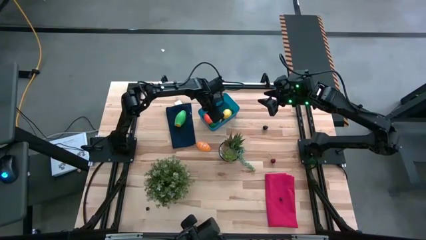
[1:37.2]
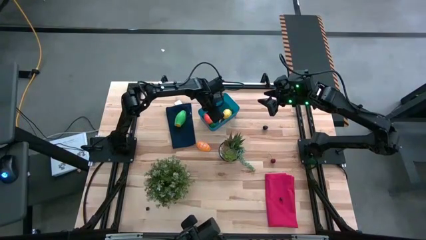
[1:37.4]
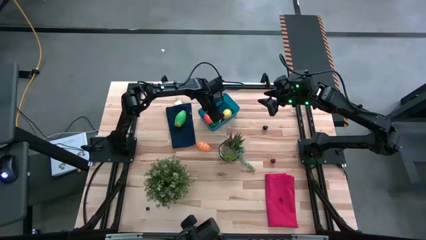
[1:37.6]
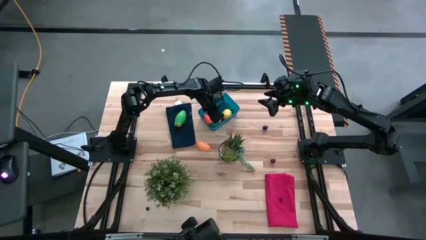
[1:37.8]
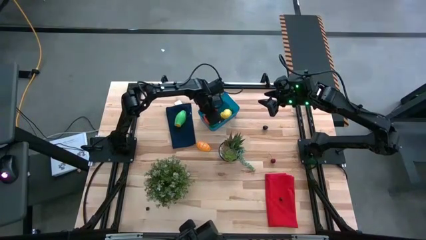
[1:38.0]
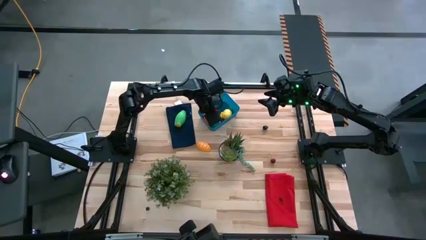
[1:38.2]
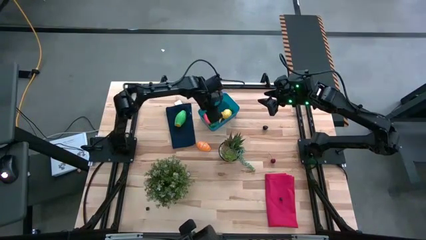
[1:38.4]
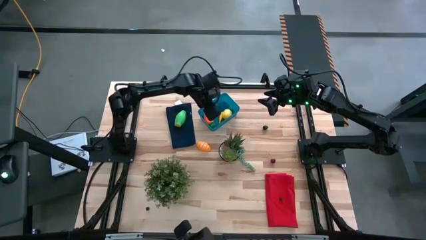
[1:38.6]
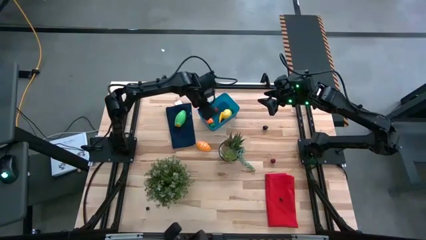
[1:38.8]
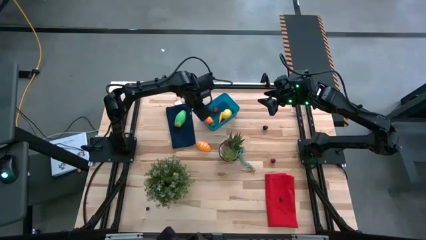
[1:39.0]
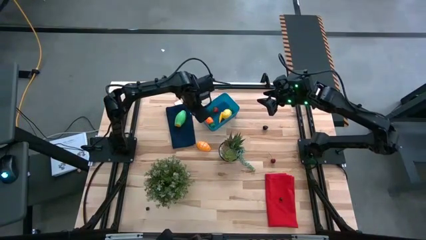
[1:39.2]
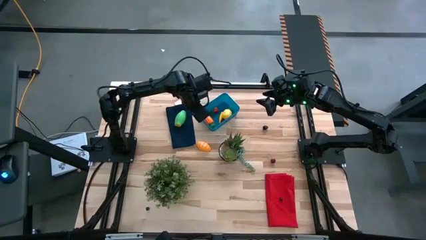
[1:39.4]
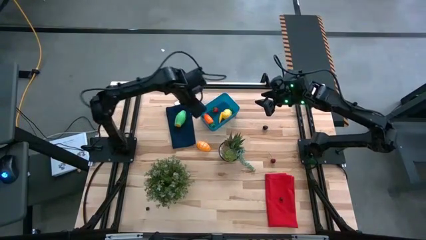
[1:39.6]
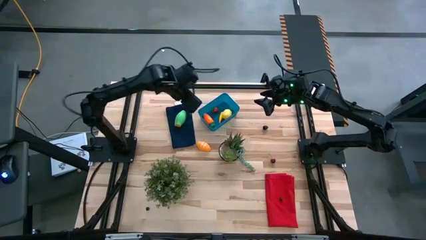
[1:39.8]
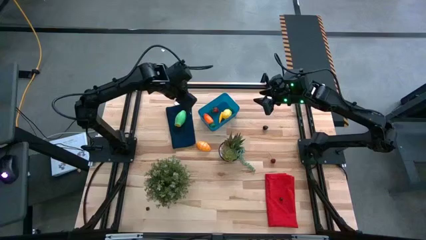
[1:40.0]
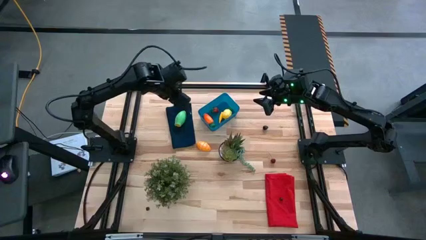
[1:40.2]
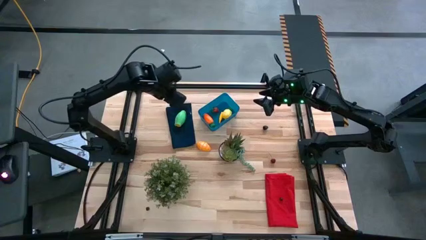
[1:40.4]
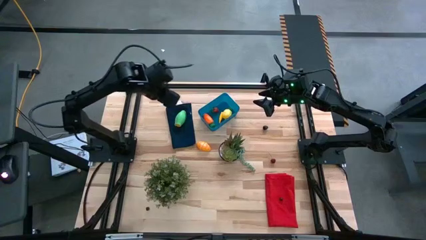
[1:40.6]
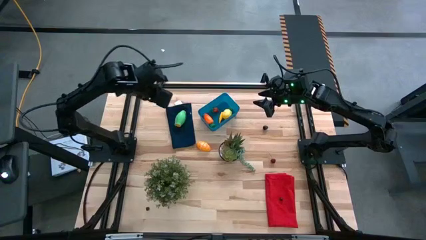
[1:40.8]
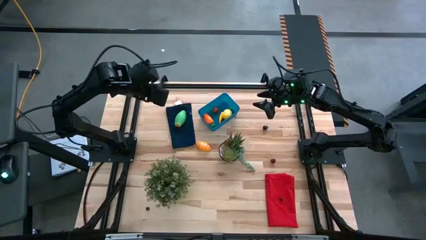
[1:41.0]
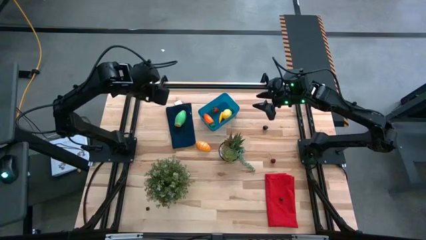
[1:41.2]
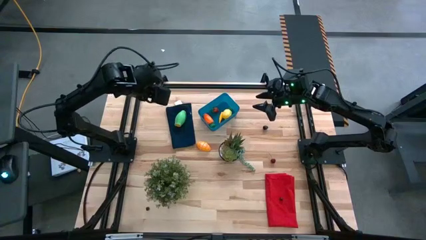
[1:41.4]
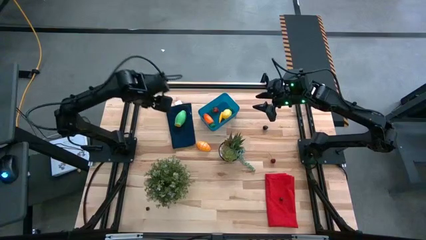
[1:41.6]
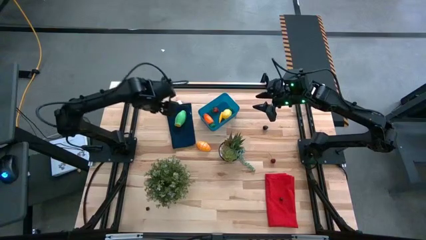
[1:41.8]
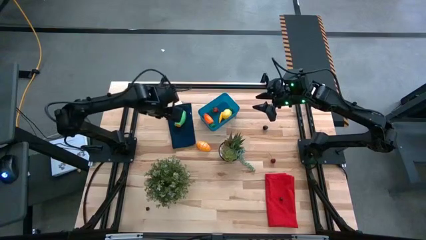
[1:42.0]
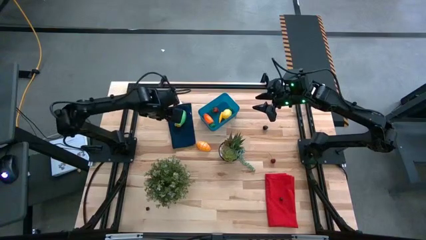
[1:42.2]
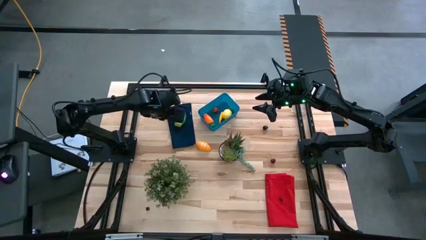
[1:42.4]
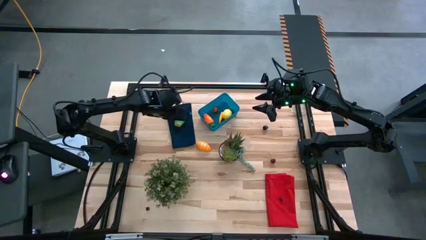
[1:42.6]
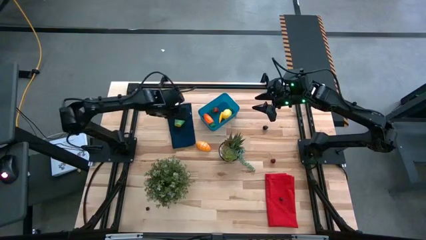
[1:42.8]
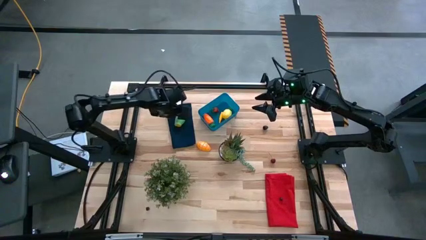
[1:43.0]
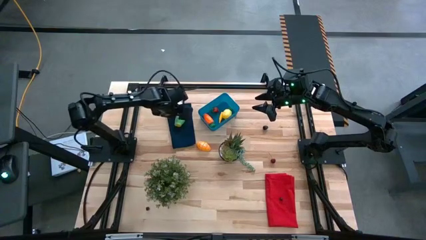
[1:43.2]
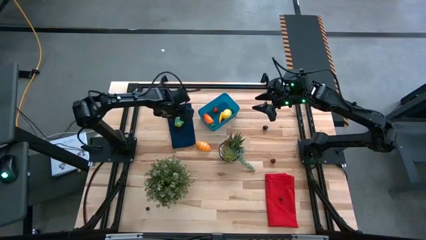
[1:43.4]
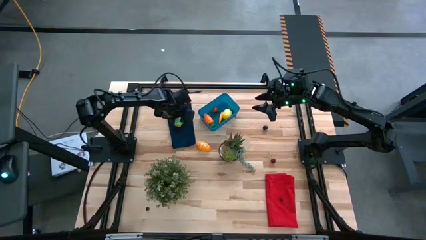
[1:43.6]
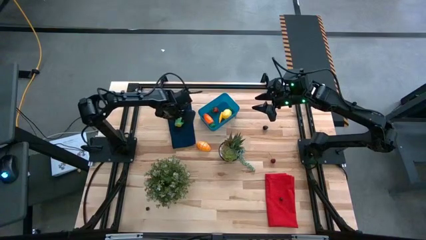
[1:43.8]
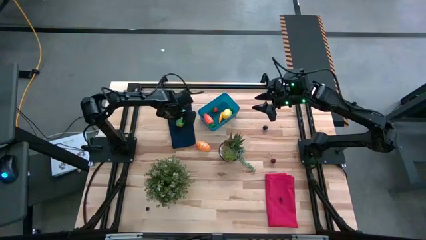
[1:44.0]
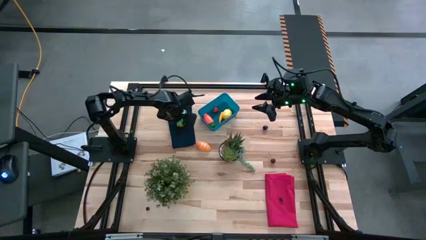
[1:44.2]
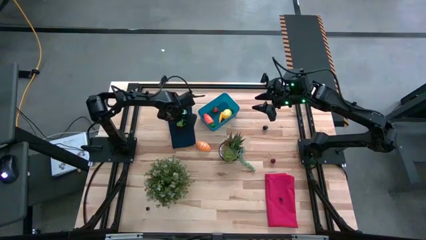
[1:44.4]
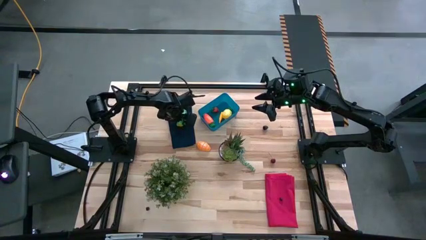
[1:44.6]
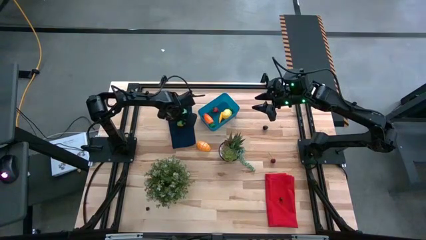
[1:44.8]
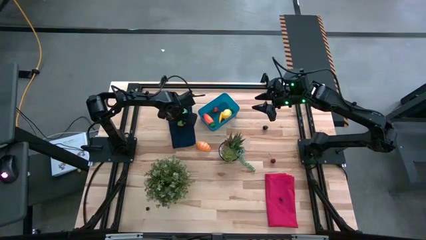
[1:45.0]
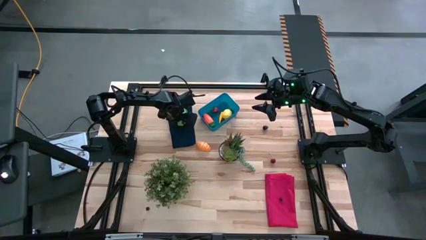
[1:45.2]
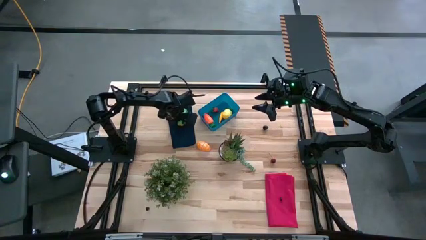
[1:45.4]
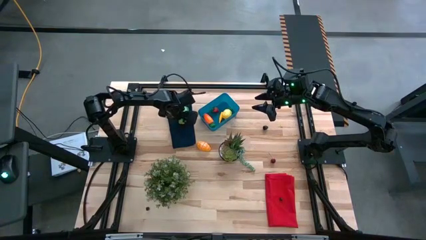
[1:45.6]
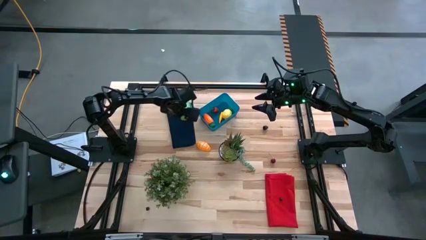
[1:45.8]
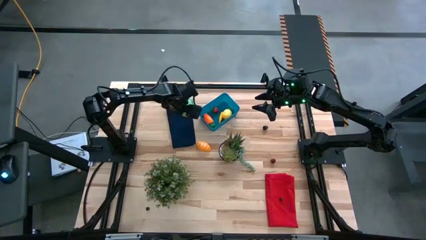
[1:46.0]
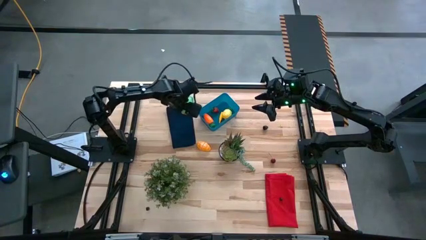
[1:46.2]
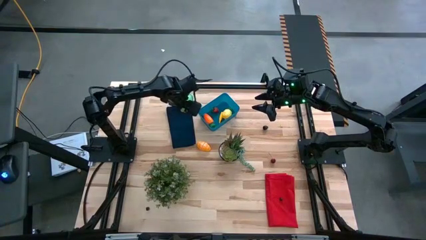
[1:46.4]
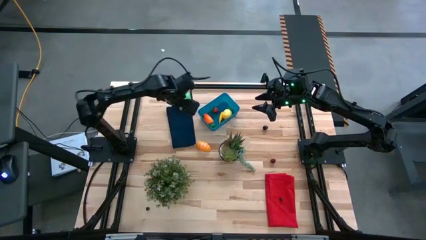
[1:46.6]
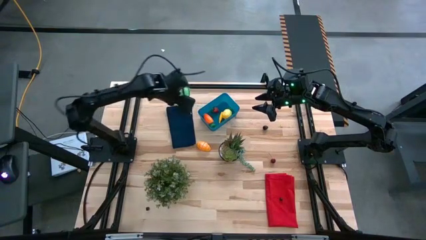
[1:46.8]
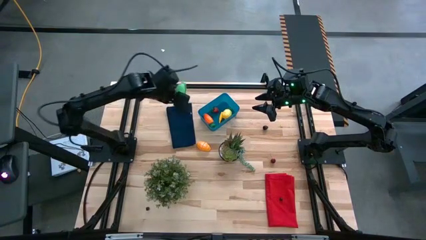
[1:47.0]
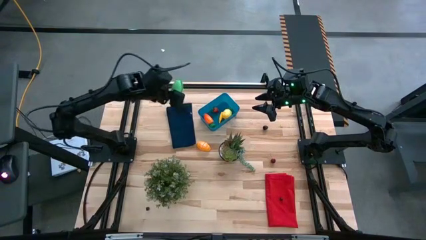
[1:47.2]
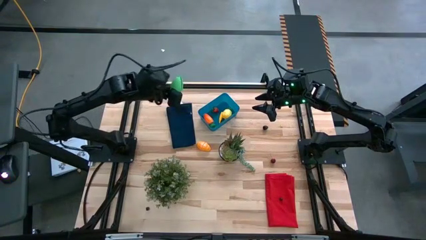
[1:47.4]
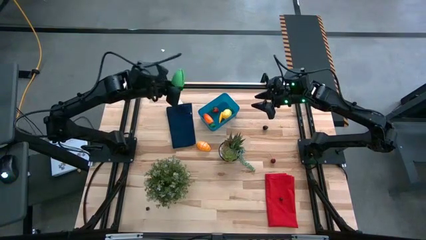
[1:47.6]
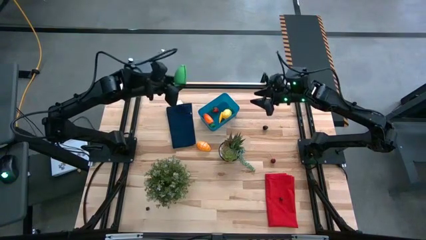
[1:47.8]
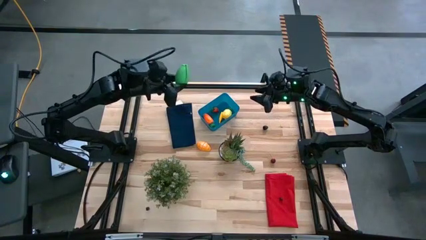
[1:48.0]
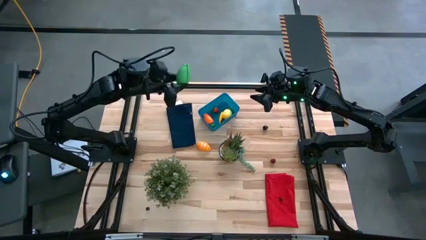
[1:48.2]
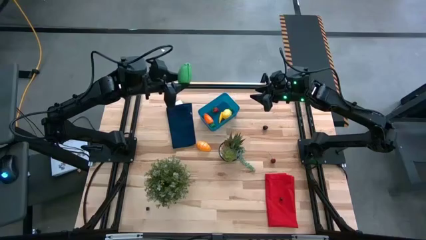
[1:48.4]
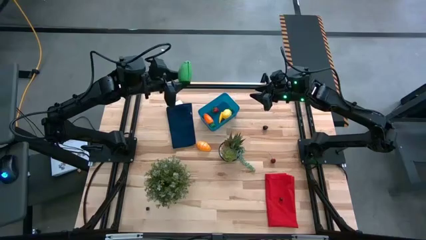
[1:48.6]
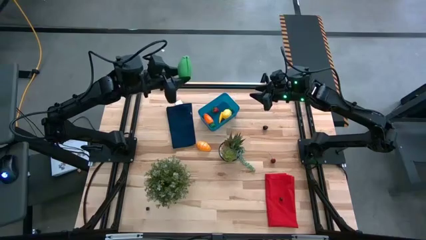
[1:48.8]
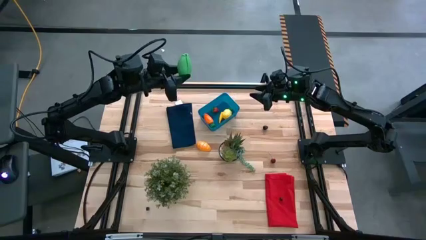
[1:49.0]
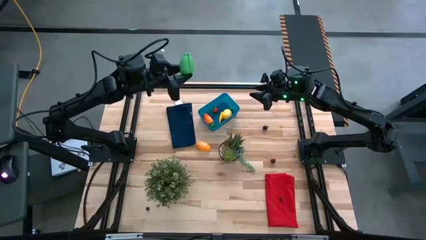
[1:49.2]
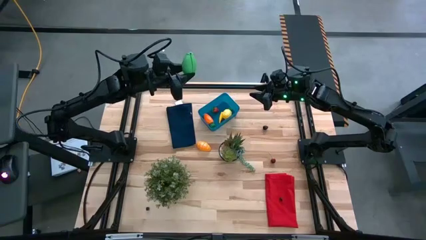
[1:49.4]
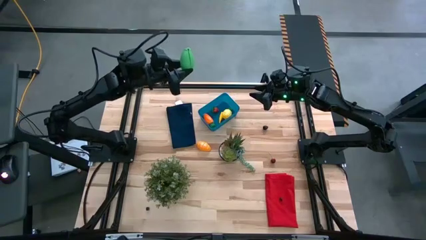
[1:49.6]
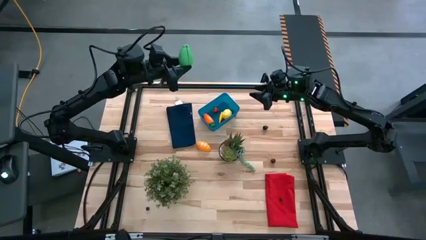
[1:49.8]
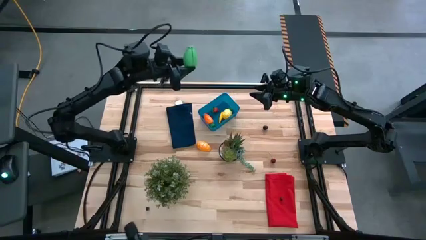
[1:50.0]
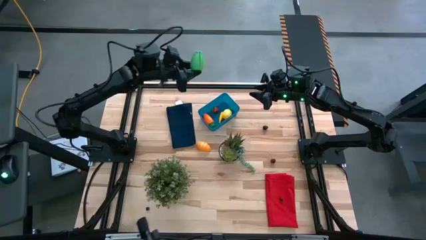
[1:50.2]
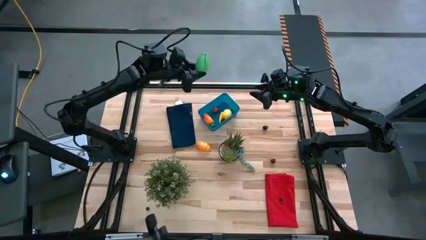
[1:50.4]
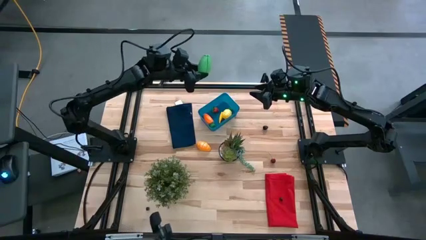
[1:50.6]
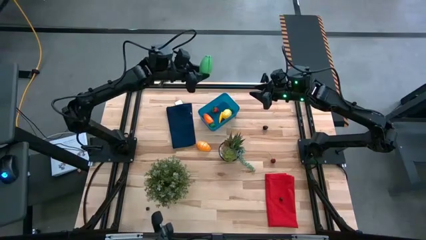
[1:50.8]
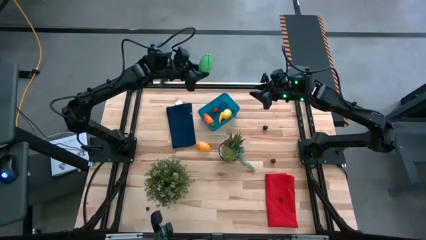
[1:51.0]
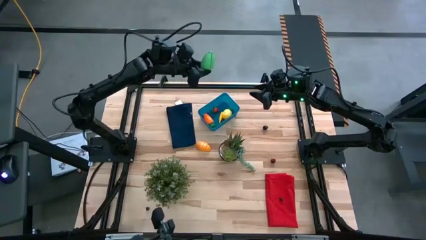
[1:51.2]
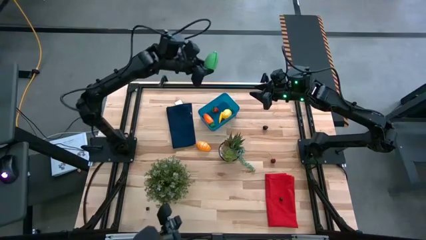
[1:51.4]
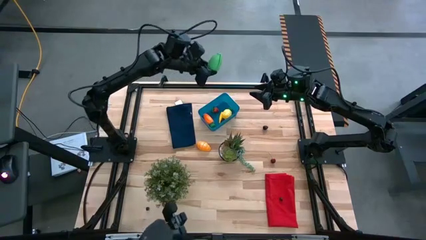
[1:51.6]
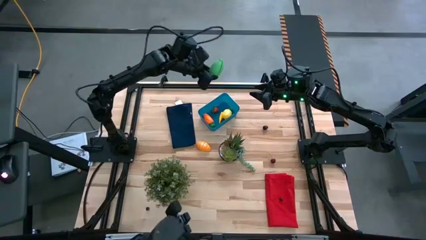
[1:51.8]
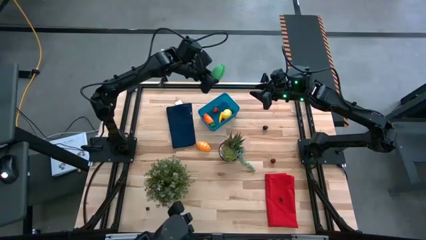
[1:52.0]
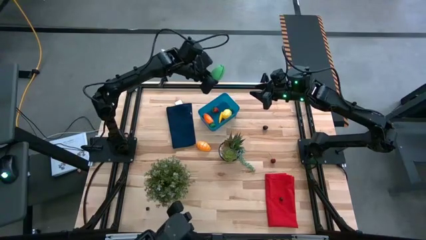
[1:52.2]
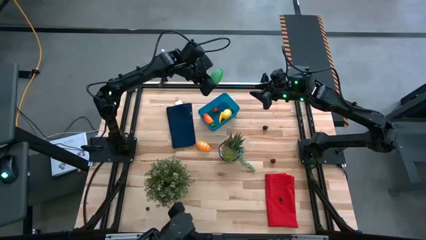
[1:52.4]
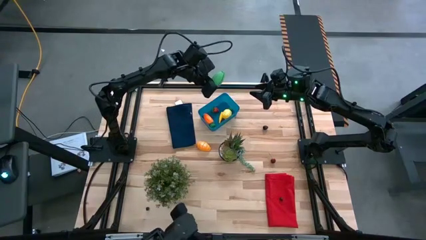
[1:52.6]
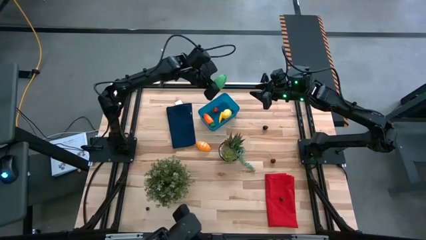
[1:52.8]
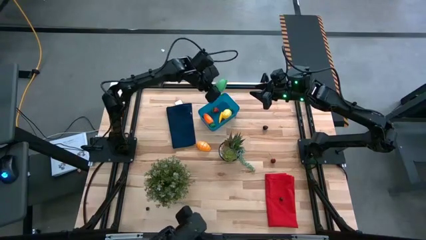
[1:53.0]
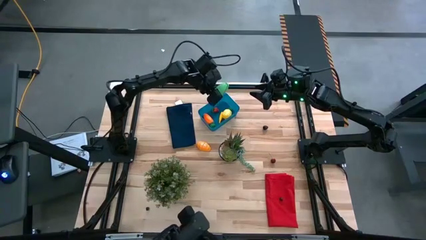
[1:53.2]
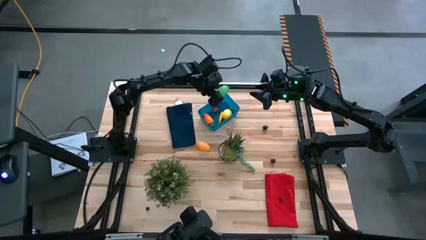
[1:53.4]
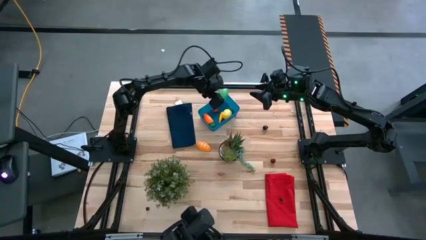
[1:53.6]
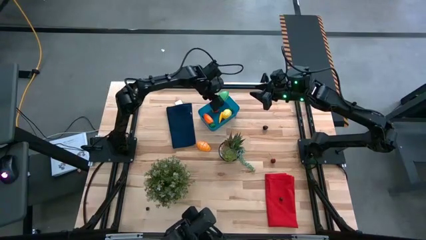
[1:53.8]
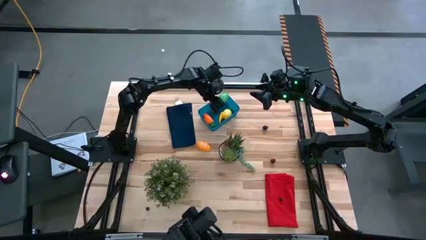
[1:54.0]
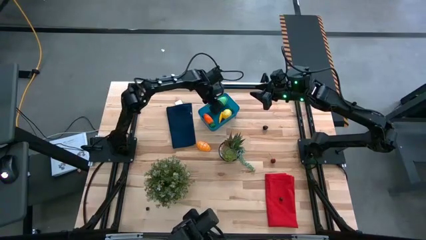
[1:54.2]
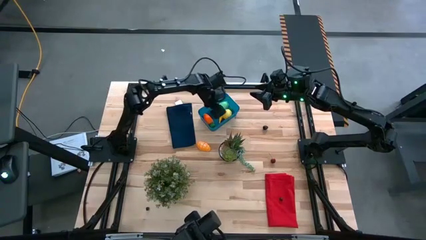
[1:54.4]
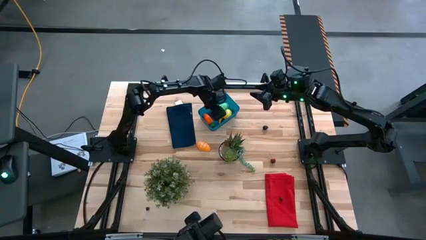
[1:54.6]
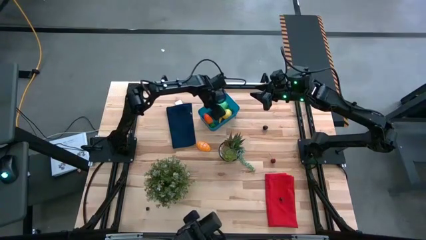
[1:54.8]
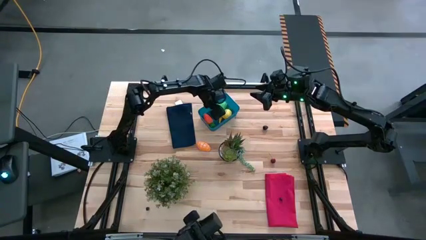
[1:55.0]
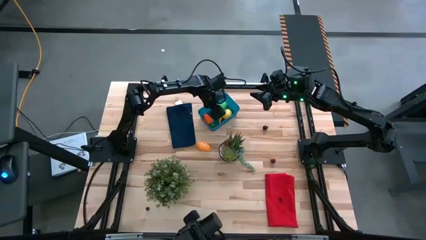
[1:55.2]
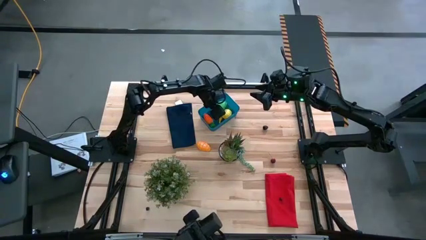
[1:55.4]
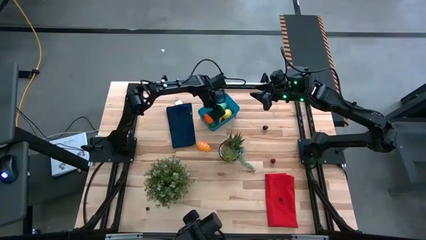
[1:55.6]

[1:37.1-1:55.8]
Task: Pick and placing Produce into tupperware
Put the green corn into the blue bin
